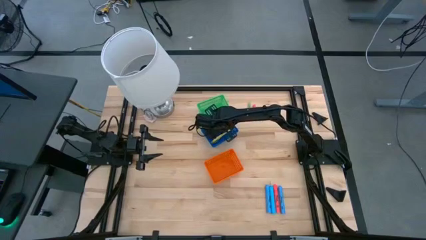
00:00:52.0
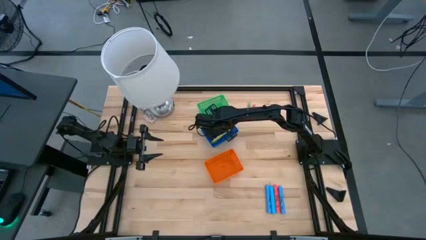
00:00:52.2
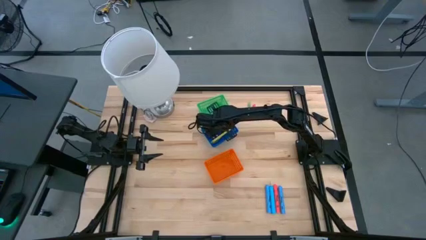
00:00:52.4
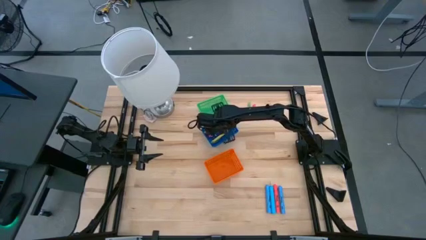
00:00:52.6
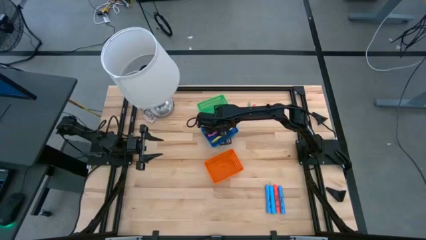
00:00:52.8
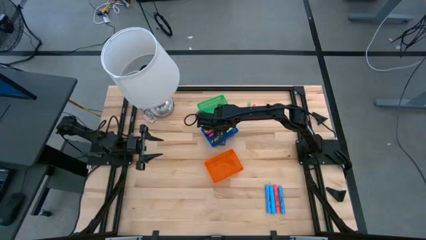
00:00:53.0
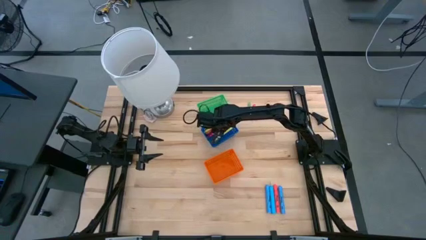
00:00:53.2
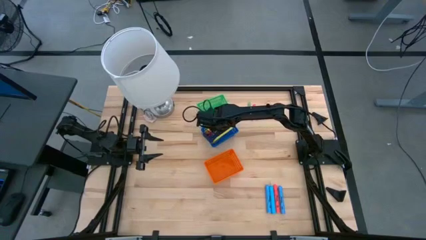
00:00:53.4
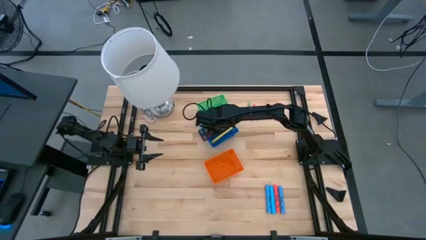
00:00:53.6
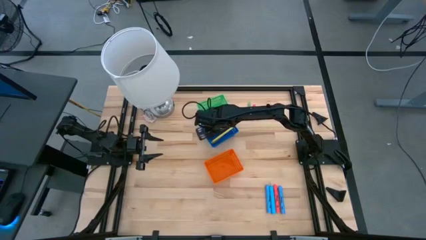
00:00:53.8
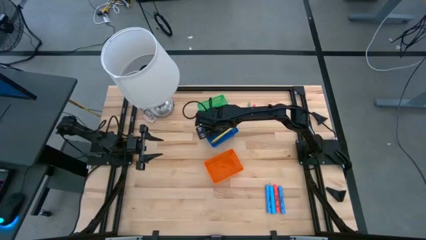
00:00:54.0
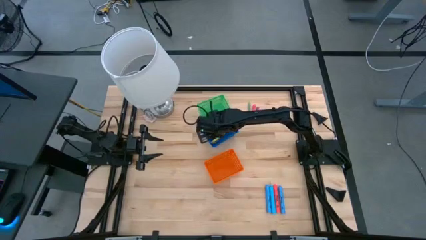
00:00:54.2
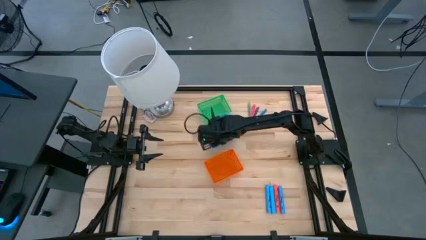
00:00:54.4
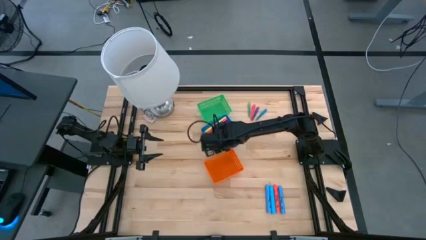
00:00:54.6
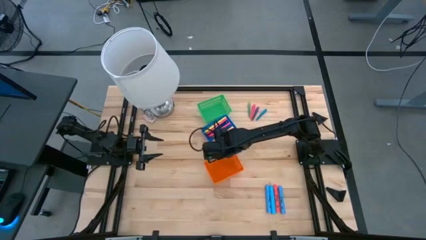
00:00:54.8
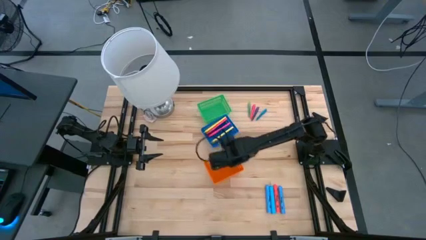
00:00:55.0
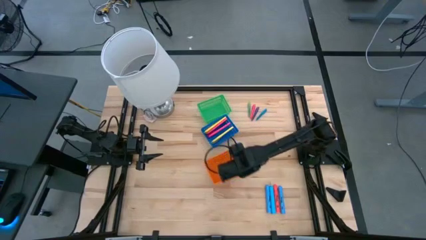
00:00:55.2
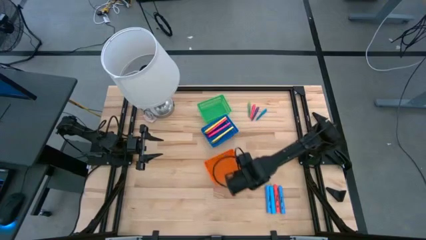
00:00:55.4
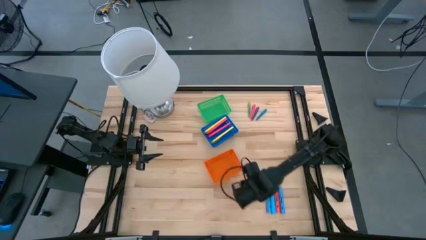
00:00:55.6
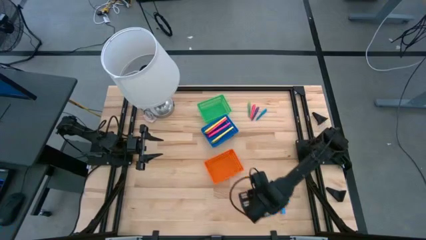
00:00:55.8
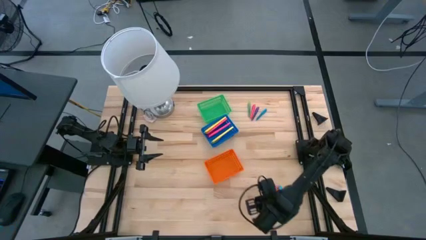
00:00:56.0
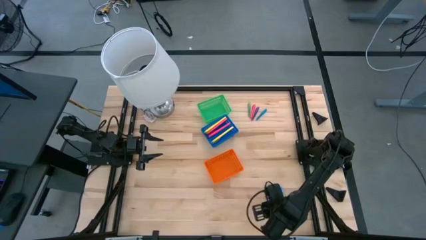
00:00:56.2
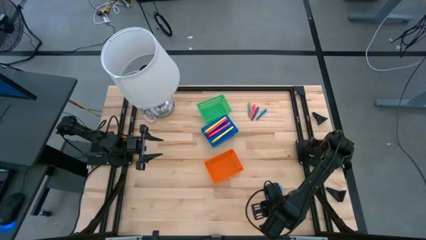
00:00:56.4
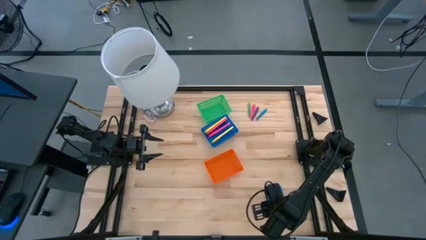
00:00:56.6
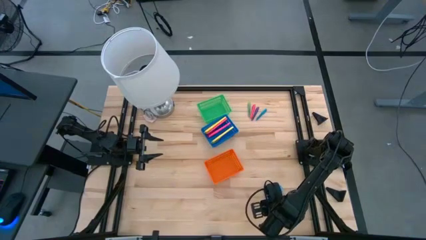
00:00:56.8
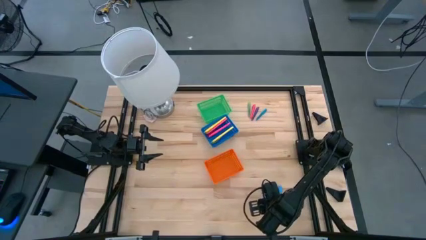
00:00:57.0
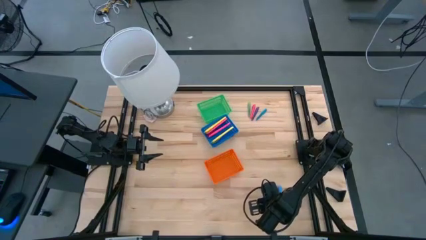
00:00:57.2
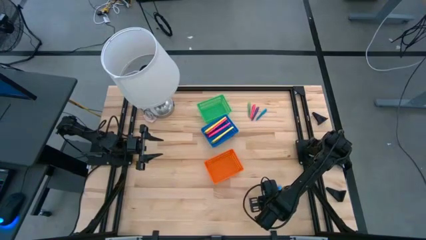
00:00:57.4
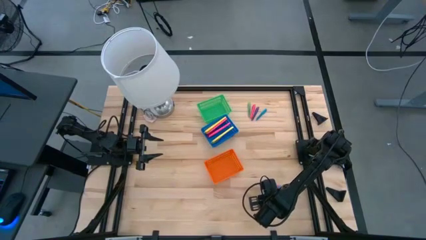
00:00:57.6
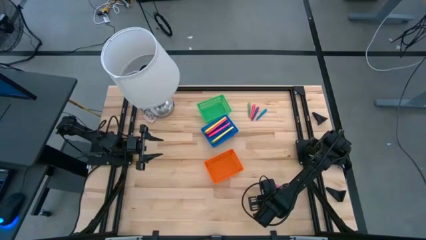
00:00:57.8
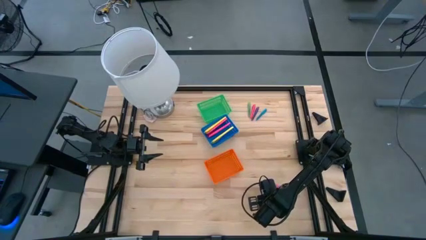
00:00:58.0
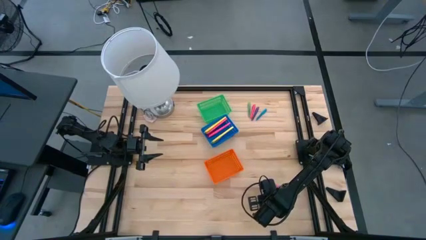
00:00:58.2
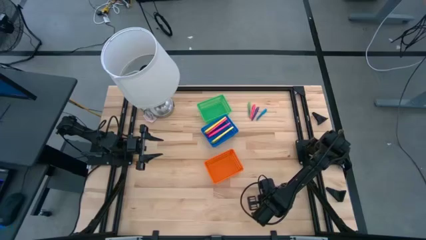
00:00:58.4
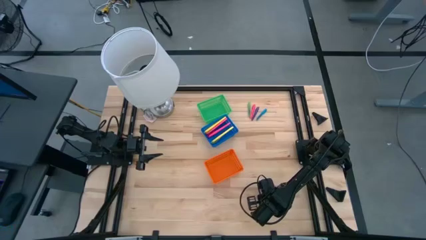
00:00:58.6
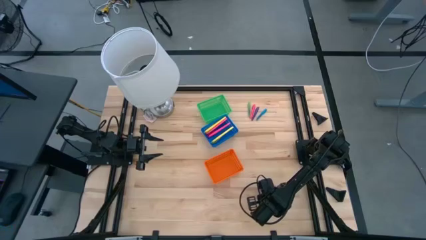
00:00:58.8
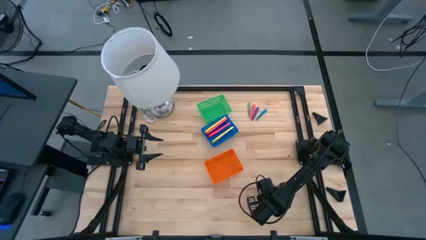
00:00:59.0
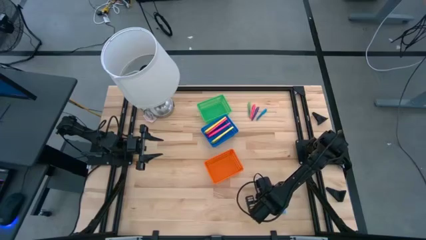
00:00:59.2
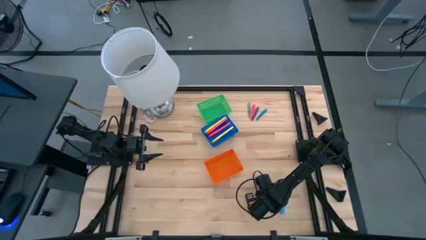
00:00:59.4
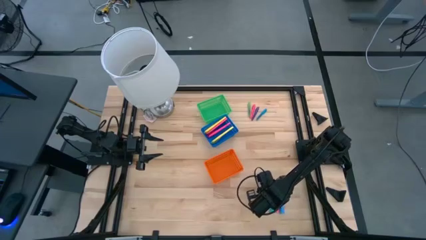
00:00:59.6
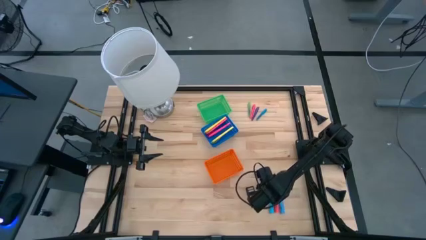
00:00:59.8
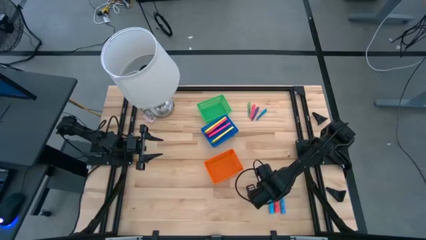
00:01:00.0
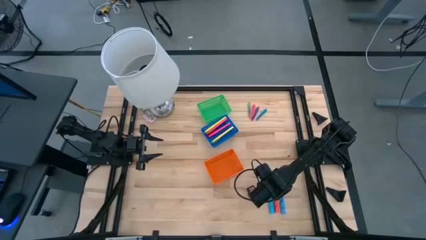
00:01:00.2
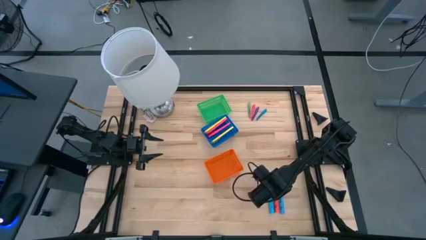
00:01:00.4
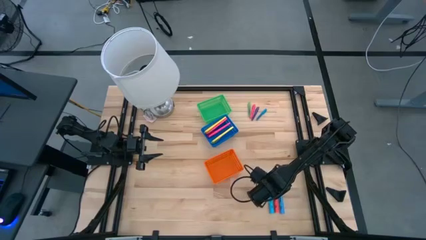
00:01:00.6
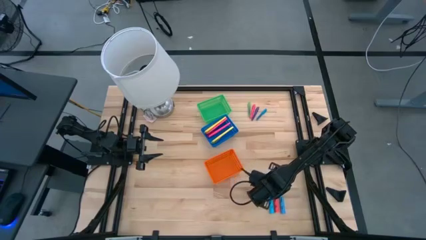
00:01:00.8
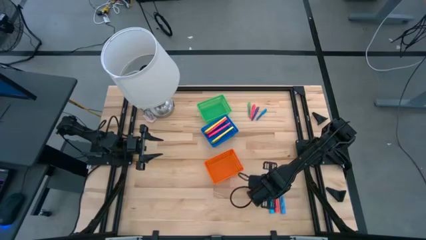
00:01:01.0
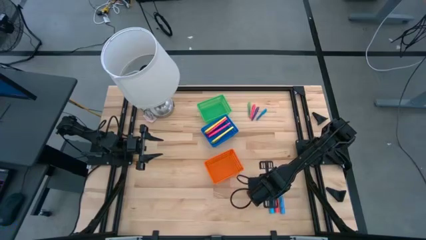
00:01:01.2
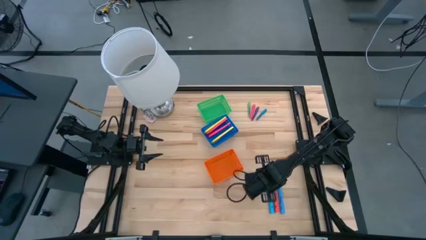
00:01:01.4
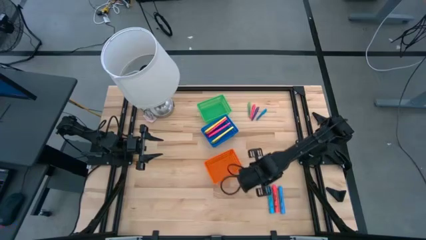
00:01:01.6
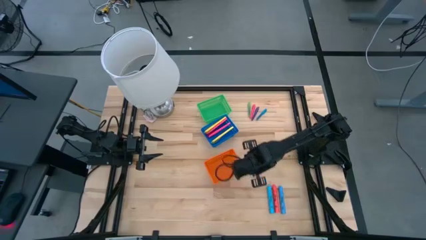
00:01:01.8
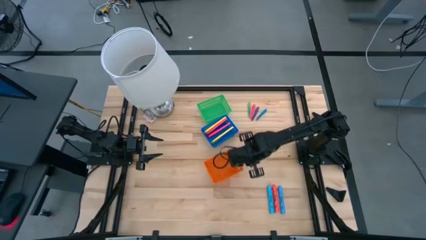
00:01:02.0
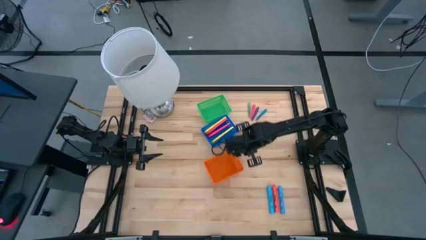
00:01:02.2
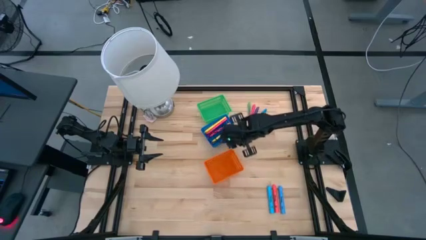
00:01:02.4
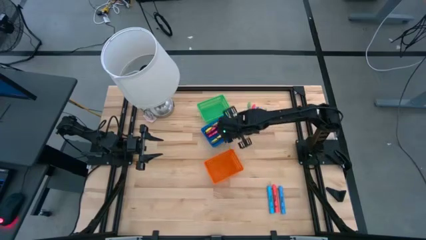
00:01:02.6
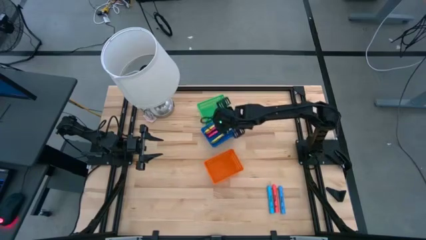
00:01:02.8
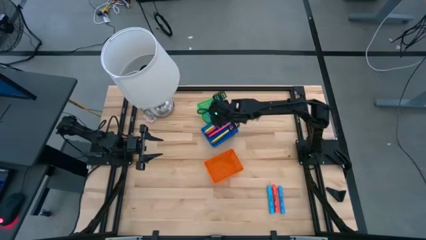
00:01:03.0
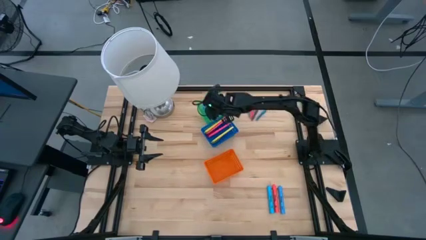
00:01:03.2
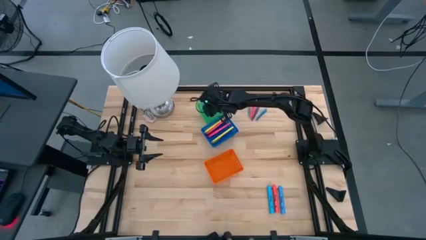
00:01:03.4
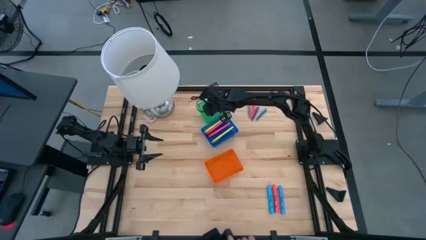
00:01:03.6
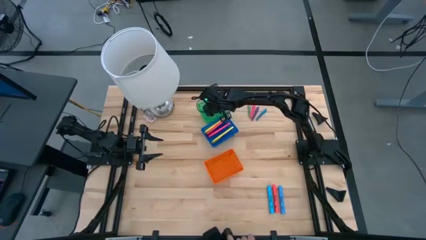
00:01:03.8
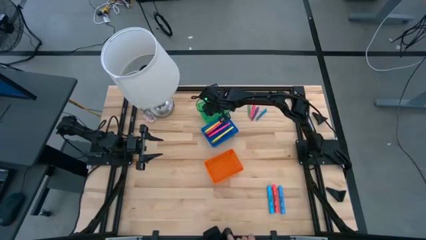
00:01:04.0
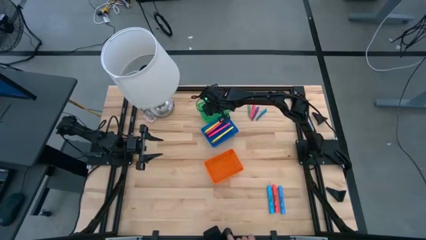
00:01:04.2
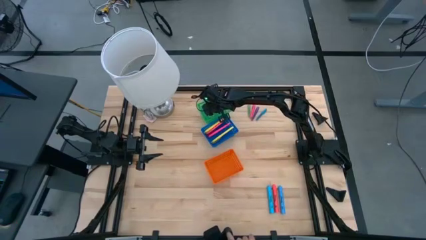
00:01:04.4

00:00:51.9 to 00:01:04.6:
Task: Pick & Place Markers
Put the left blue highlighter pen into the green bin

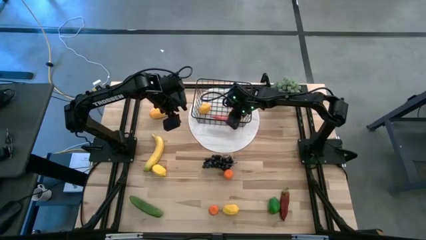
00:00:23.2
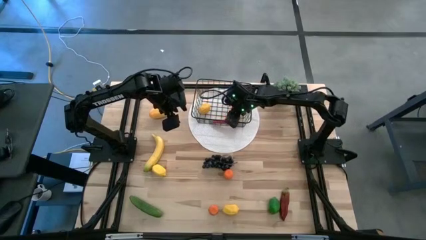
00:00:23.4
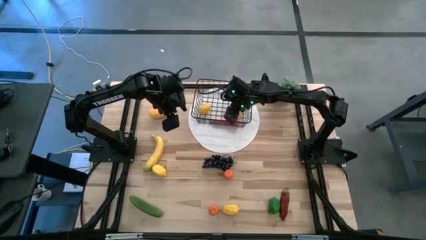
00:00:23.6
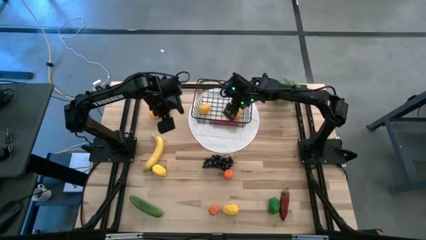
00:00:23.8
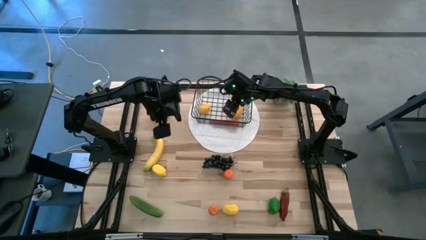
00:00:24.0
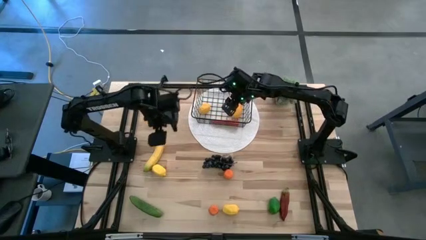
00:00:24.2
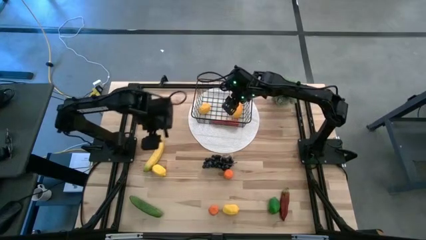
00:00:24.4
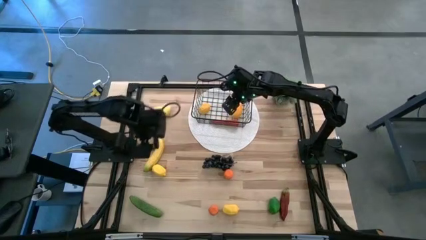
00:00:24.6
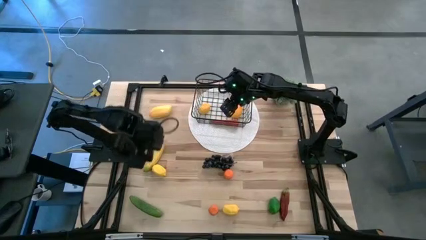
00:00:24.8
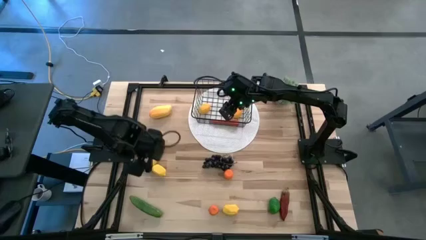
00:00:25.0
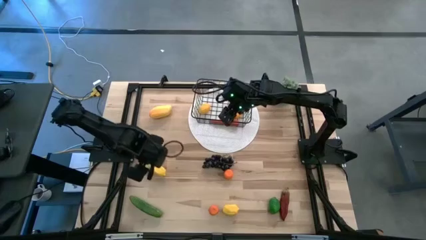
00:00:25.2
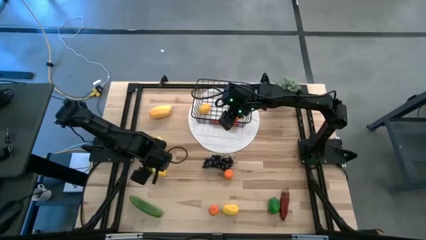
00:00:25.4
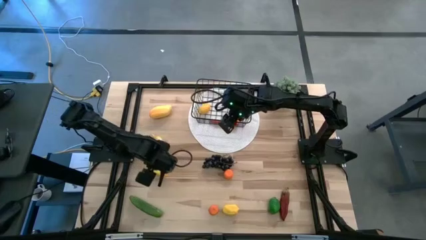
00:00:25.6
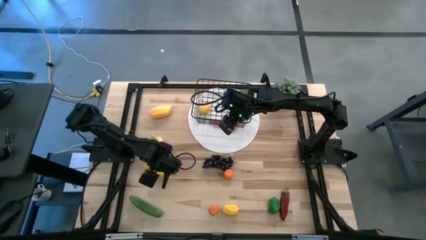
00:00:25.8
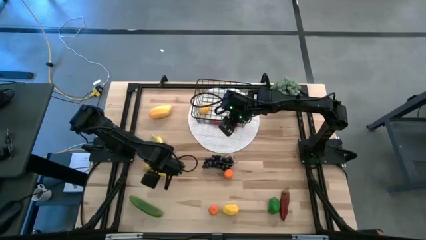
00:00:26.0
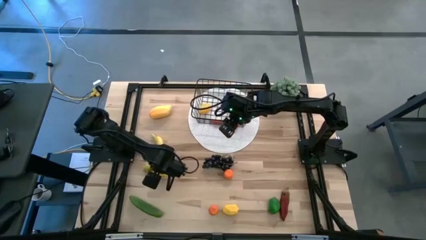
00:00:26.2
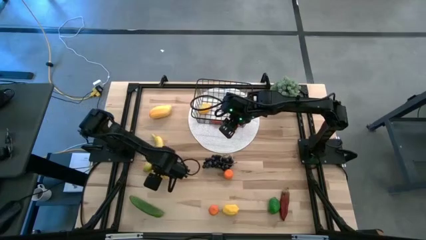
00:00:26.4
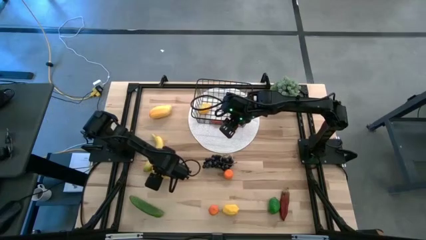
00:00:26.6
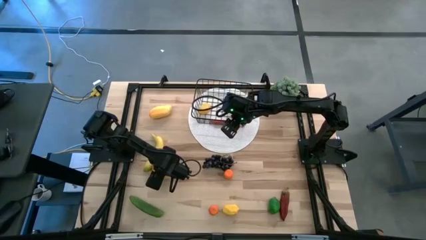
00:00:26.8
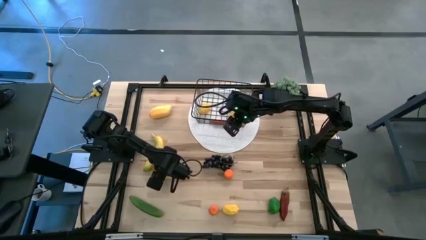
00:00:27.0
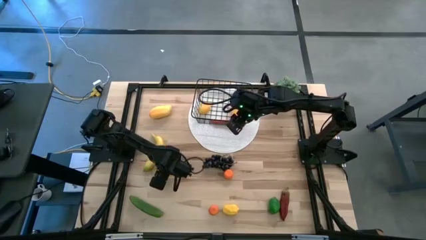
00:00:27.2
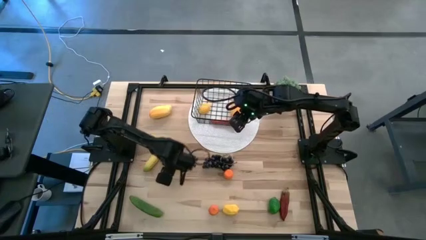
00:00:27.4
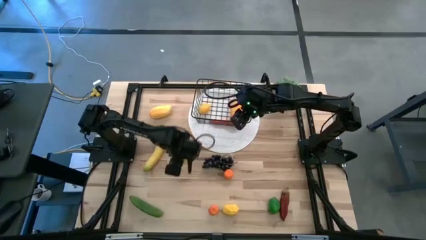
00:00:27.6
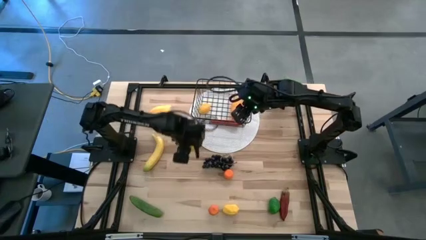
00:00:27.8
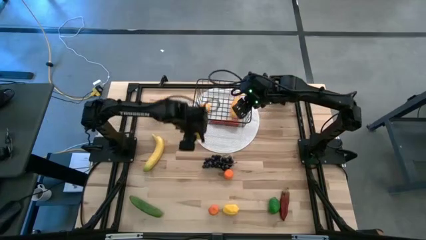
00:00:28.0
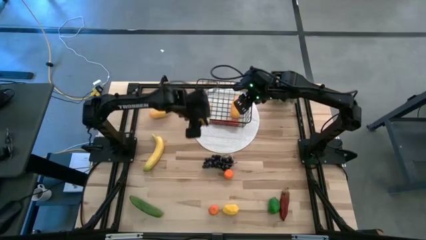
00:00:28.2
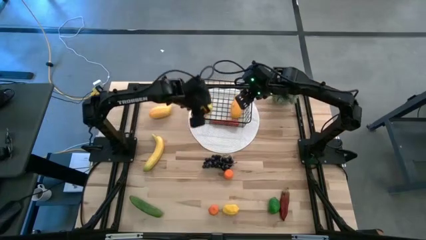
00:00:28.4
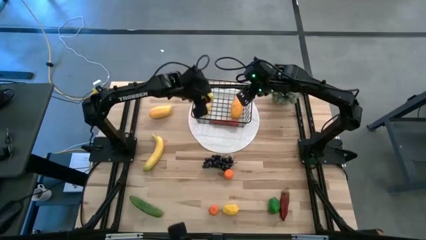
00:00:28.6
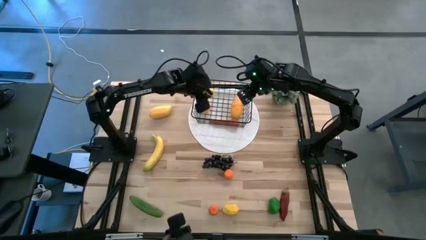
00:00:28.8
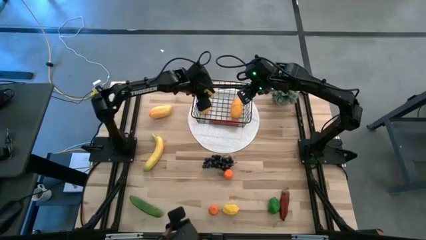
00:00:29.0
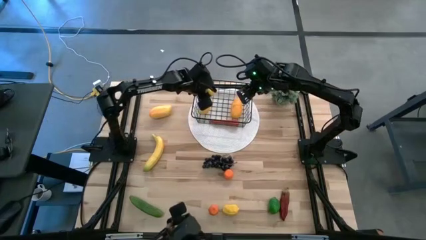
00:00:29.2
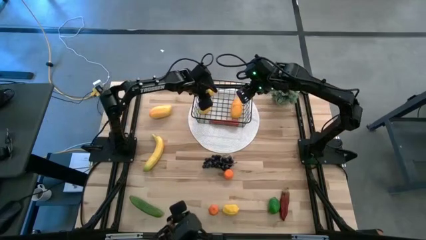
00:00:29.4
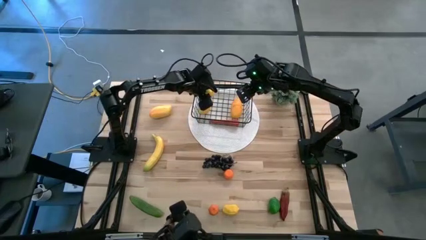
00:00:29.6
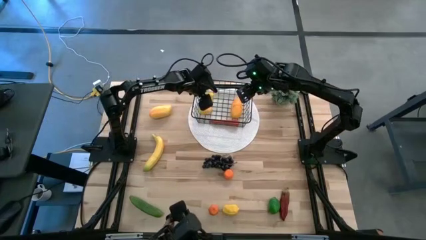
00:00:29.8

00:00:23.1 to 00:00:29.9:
Task: Build produce basket
Put the top lemon into the mesh basket
